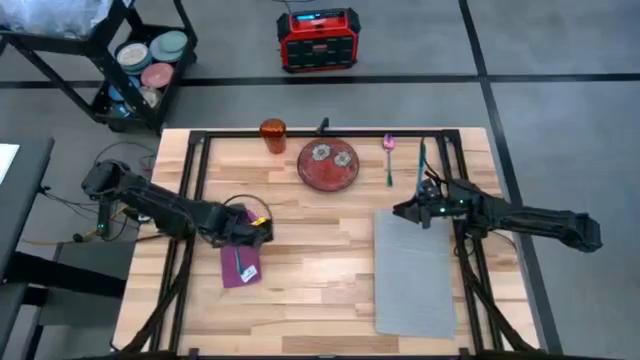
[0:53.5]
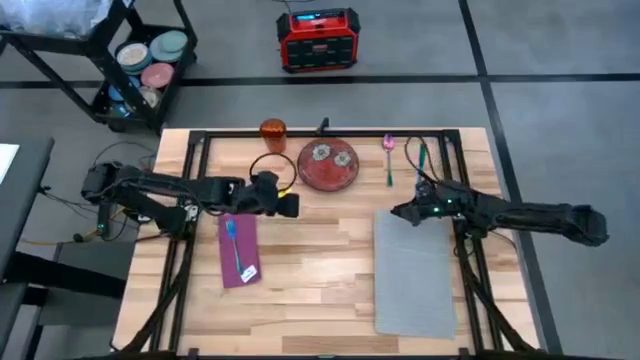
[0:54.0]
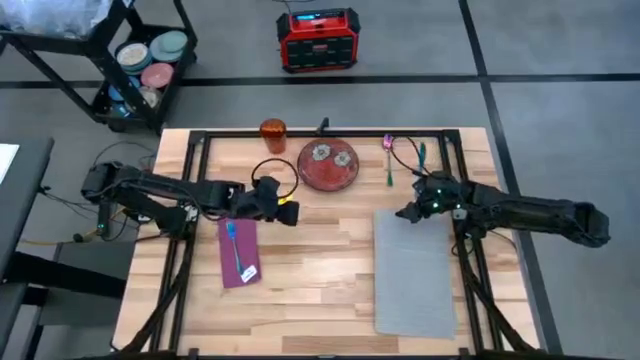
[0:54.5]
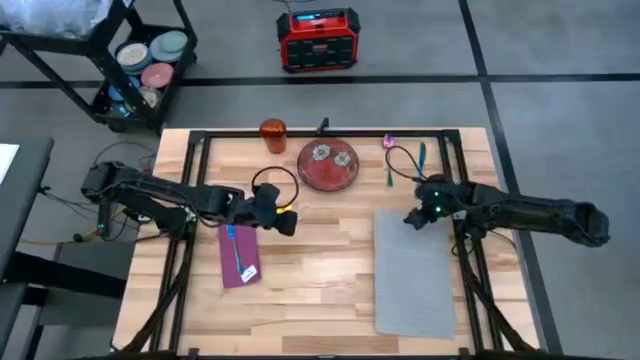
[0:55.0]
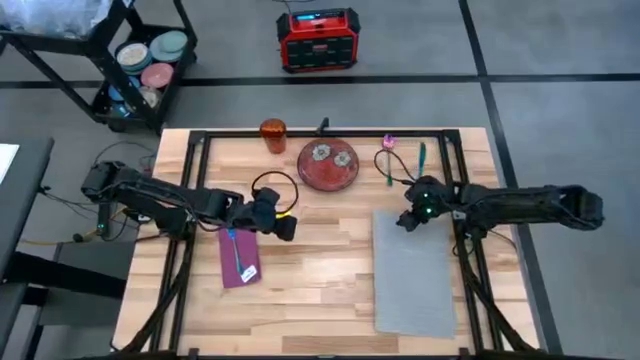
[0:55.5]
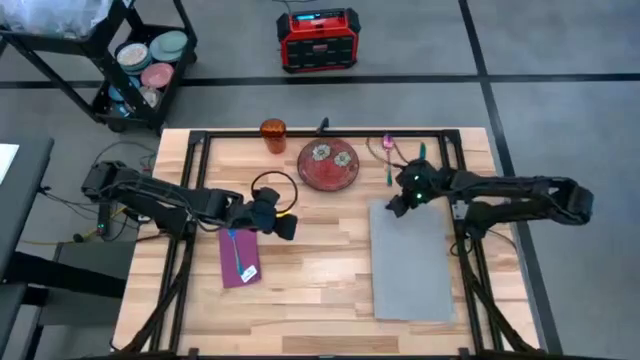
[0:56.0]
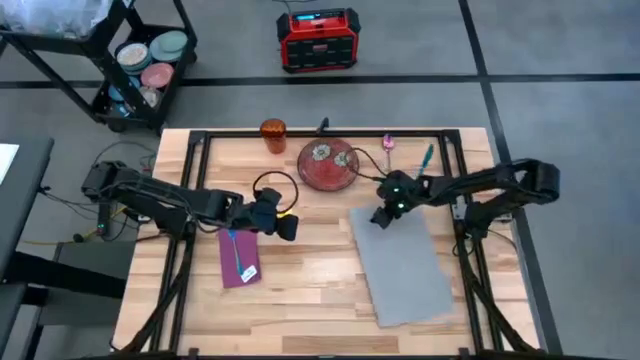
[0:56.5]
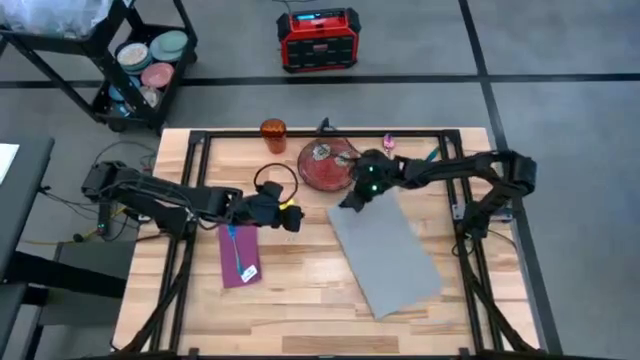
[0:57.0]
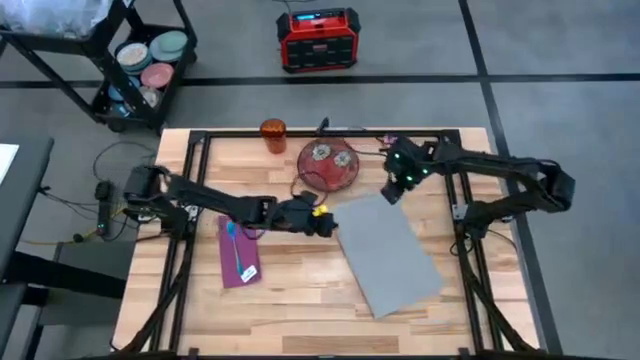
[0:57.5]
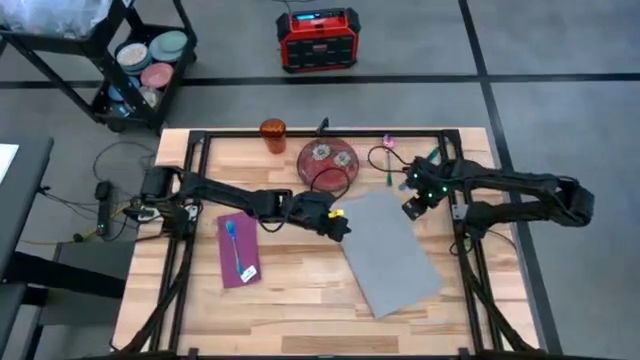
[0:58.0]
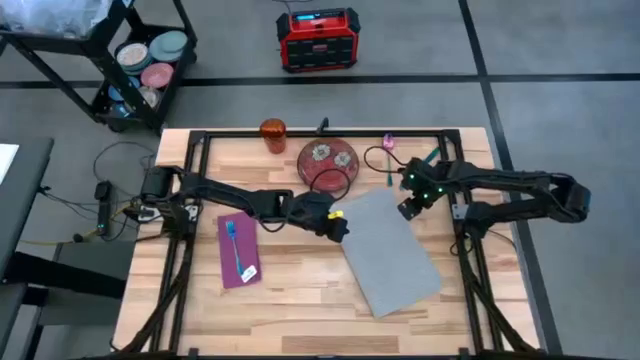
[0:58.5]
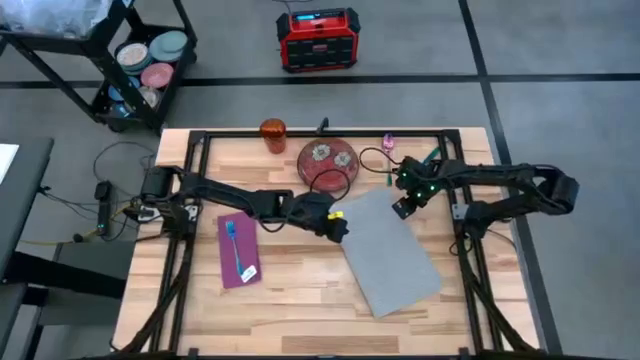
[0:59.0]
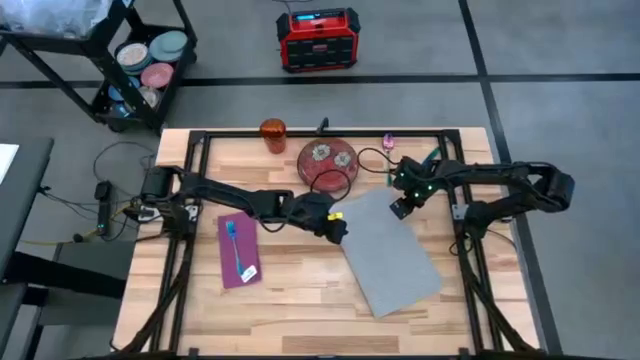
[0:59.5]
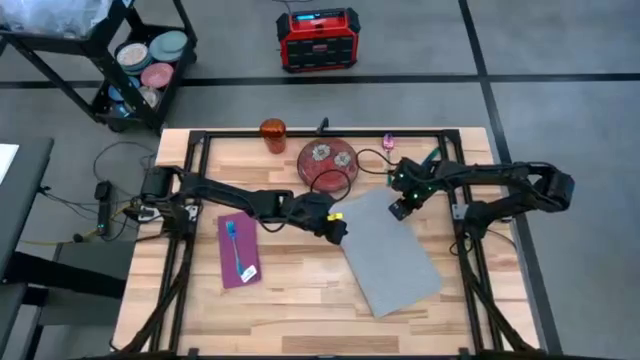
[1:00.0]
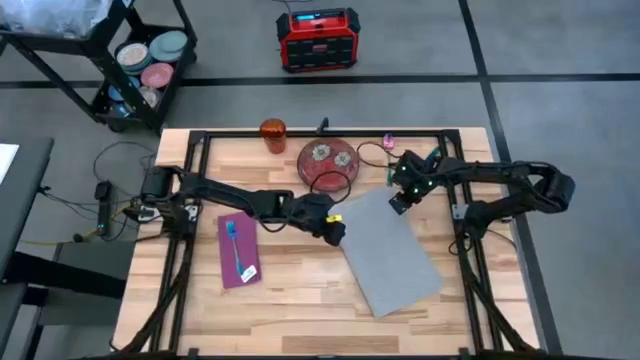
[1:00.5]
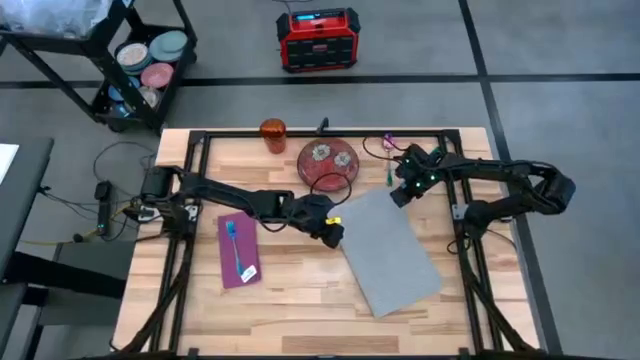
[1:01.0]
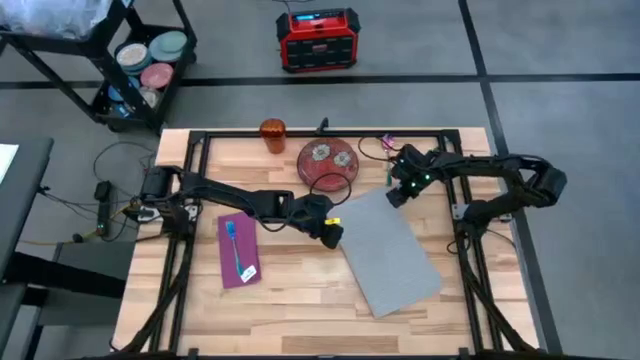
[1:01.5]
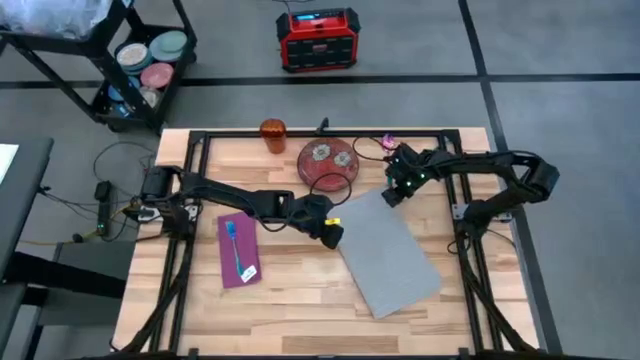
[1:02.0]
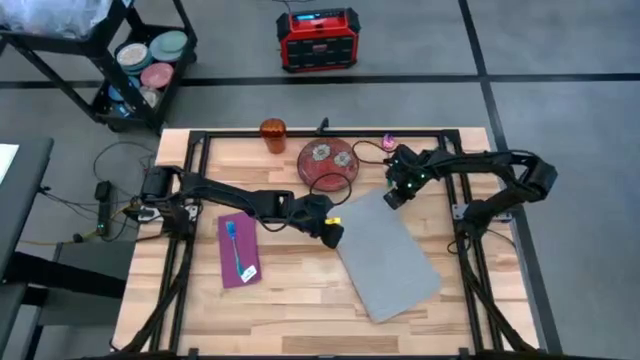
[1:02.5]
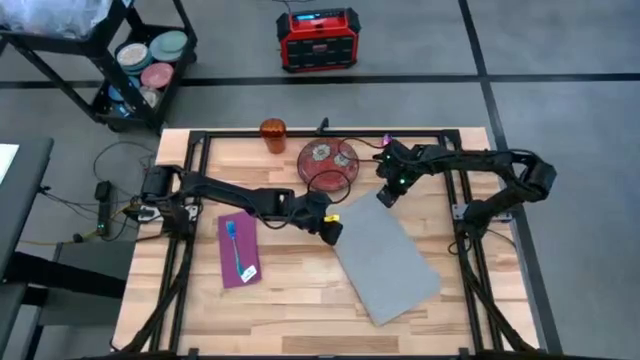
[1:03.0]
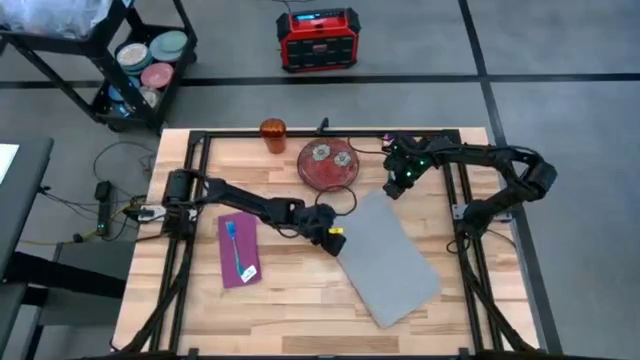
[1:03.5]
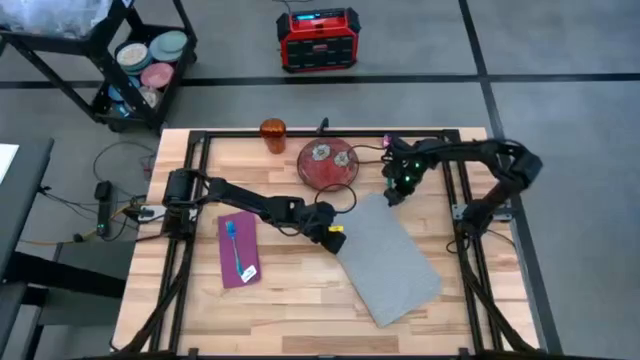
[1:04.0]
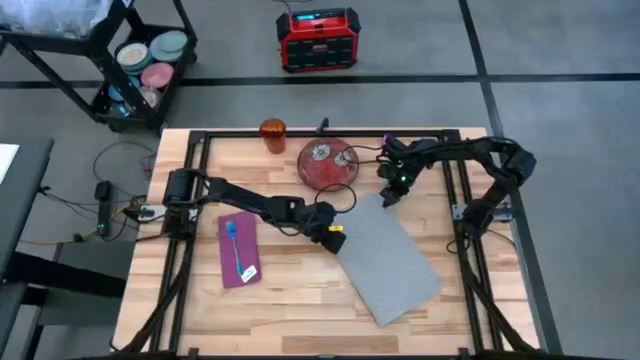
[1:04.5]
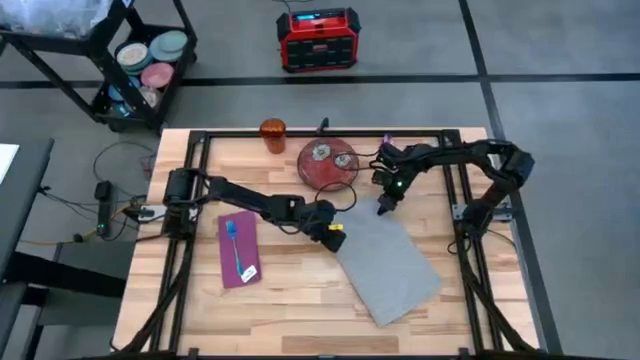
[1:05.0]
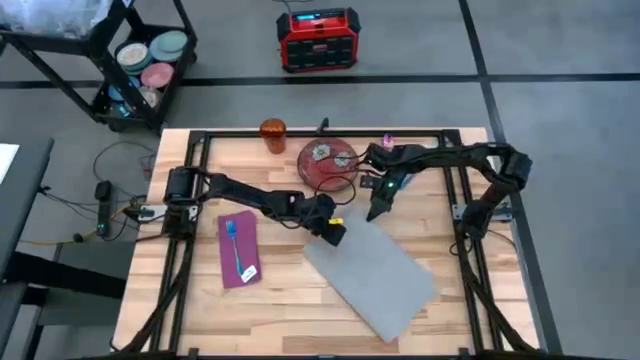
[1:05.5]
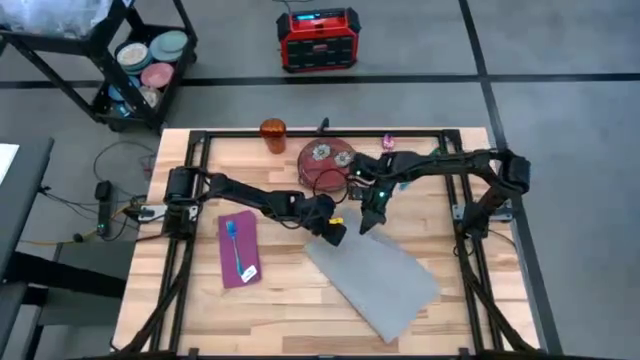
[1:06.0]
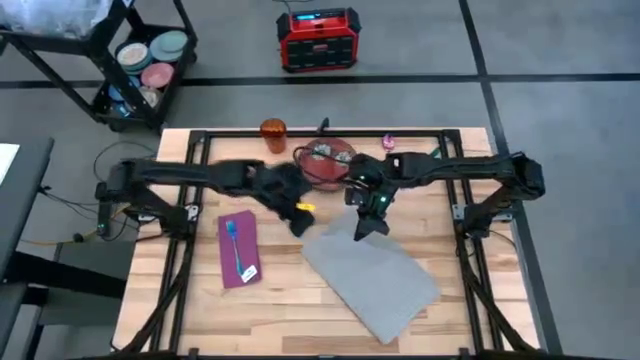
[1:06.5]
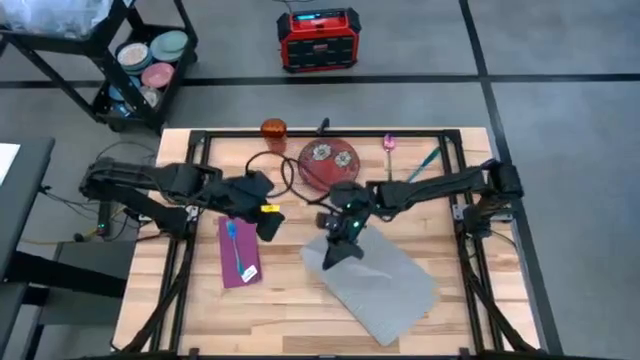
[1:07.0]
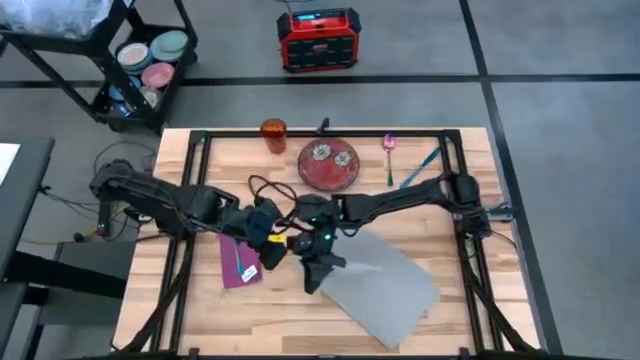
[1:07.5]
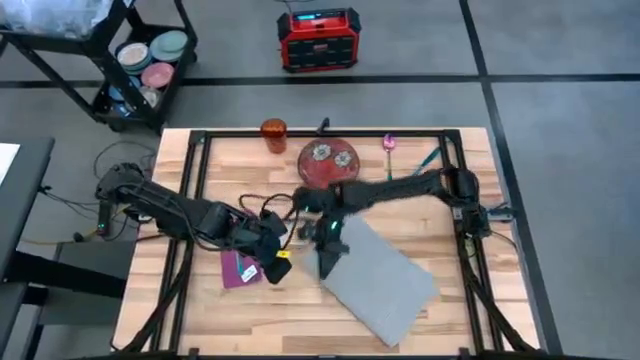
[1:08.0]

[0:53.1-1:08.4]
Task: Set table place
Prepare the gray placemat

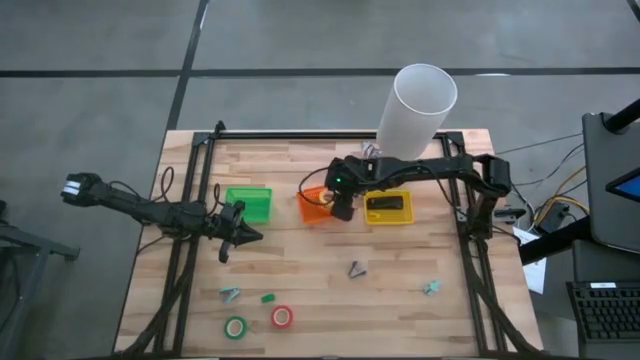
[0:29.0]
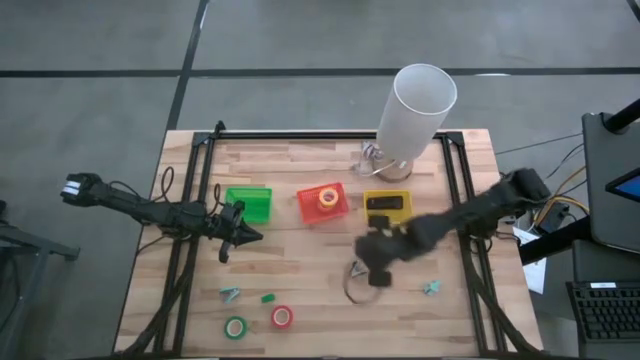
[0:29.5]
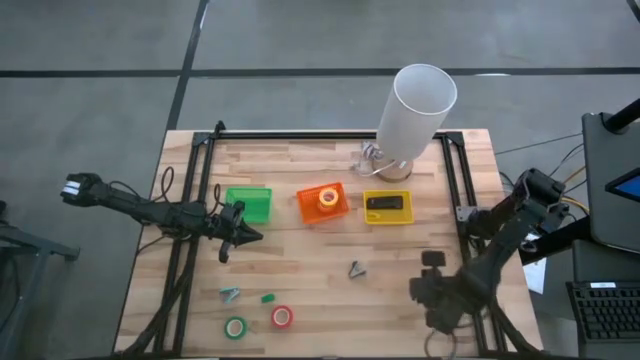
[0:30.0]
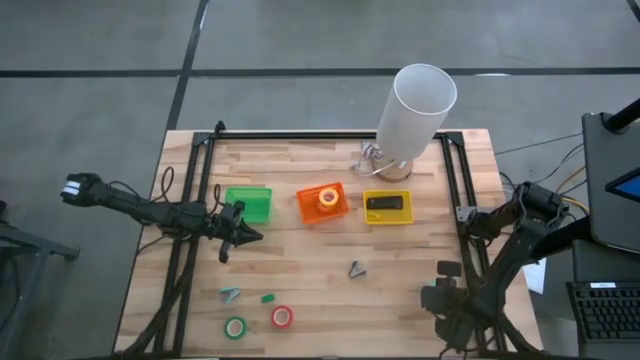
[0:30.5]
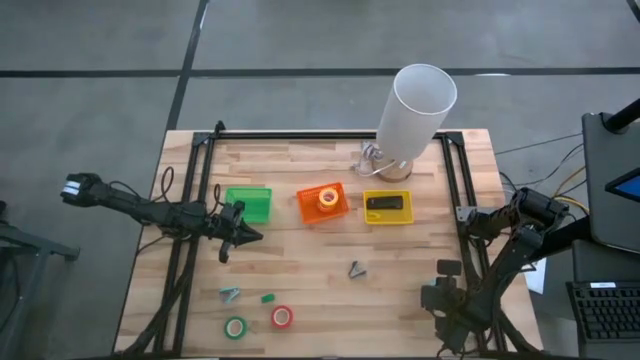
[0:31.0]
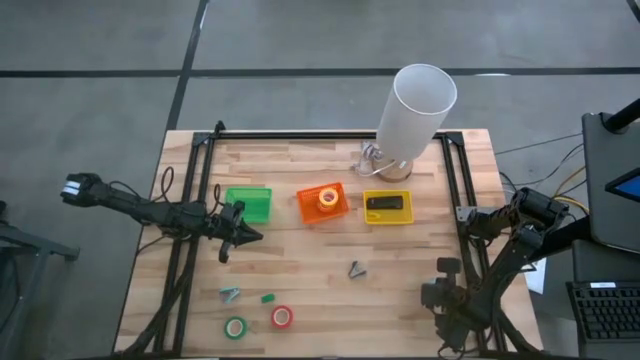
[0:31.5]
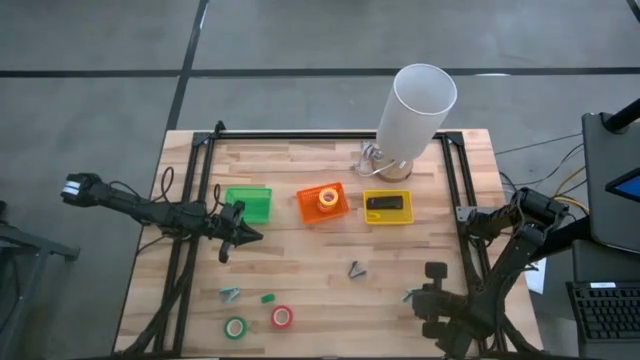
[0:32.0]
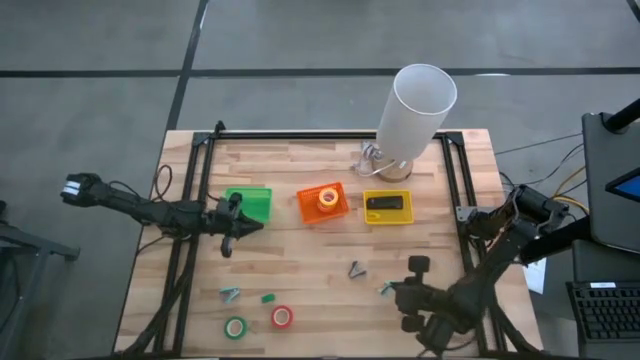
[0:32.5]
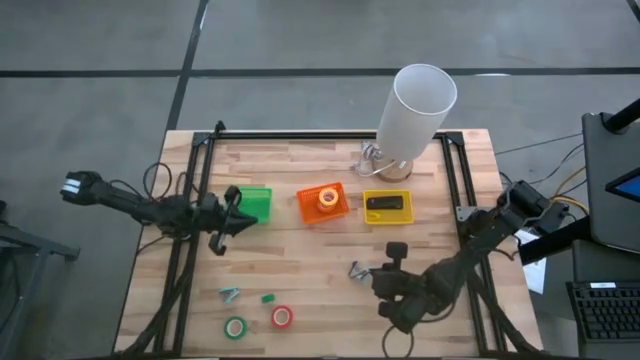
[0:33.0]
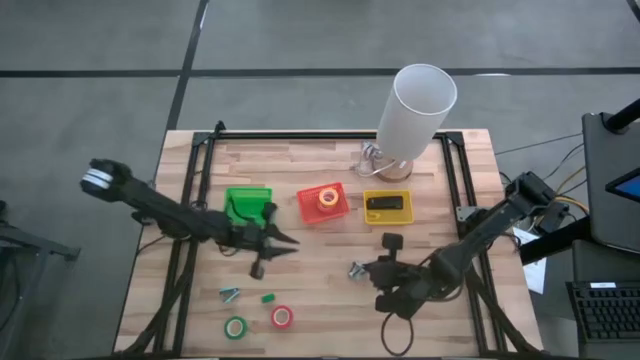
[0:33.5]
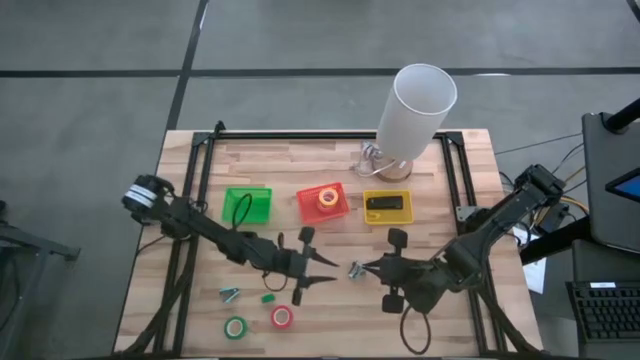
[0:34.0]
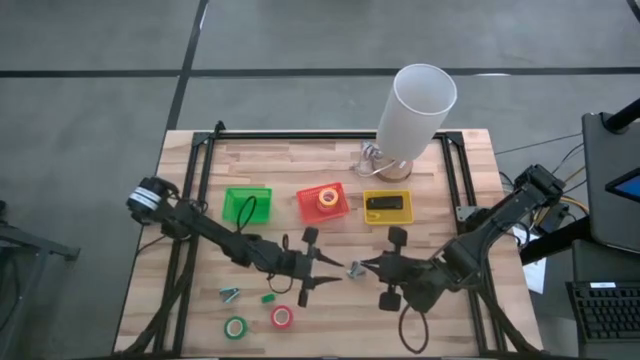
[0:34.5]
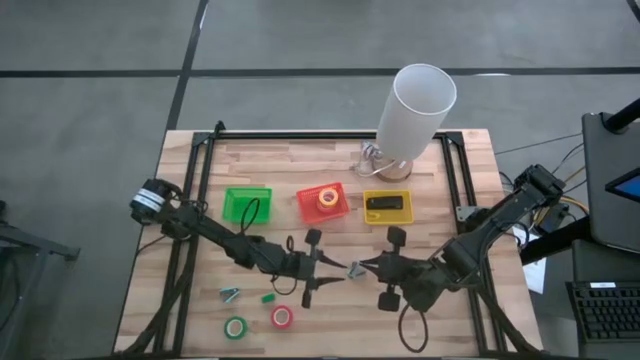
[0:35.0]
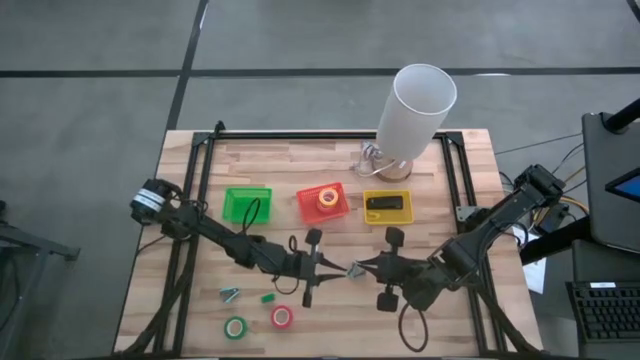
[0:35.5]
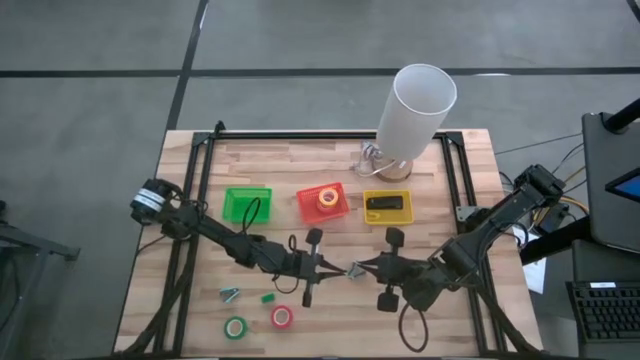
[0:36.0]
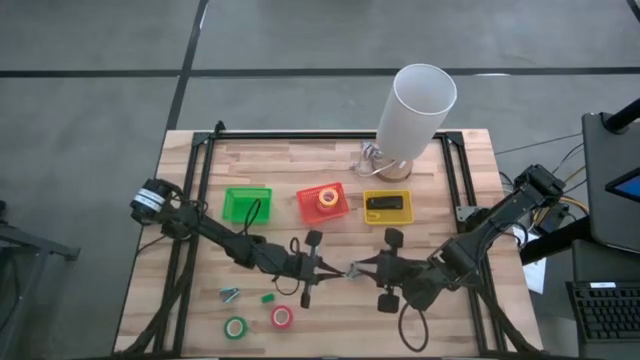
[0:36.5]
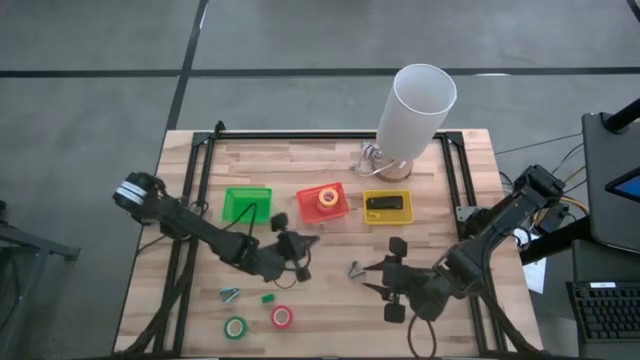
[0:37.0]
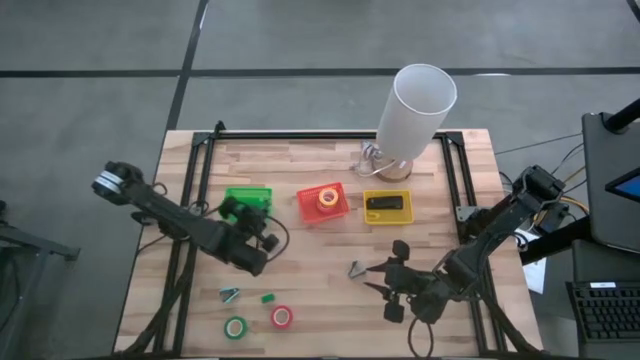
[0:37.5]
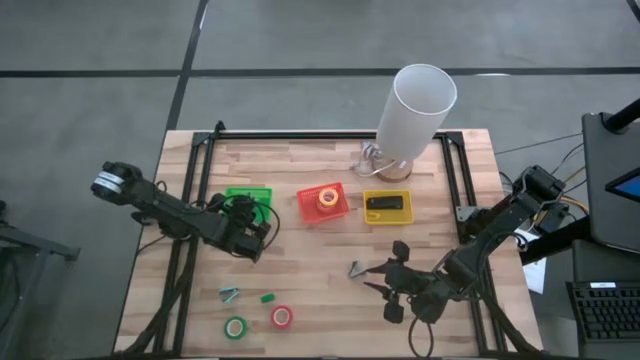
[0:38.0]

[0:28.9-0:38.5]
Task: Pick and place Stapler, Stapler remover, tape
Put the right light blue staple remover into the green basket
